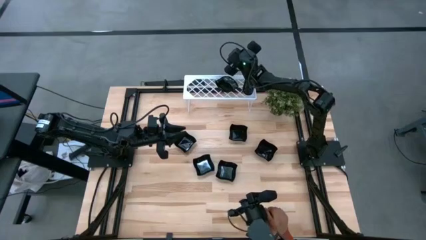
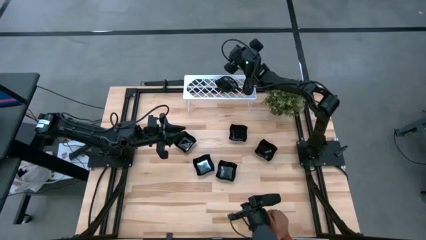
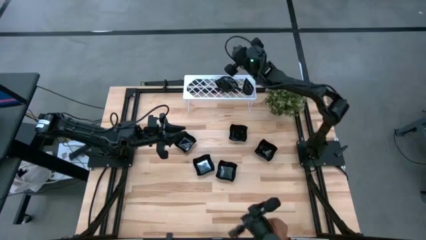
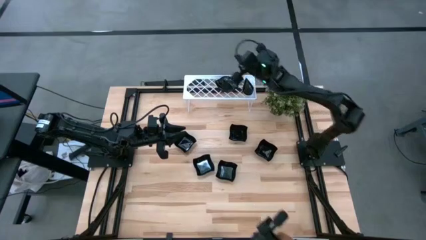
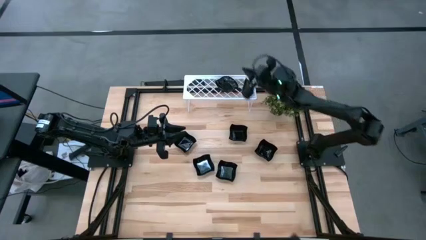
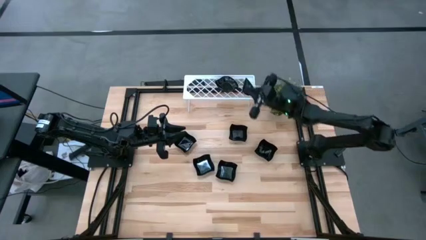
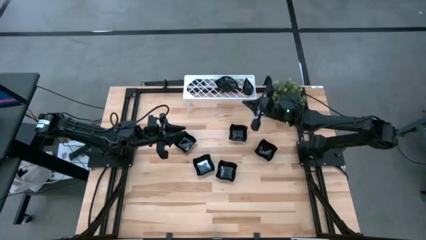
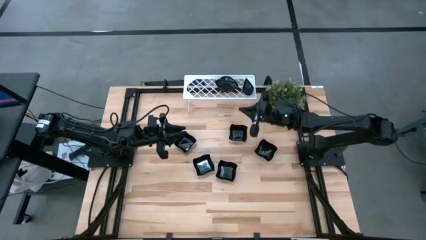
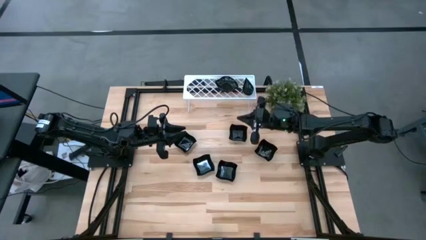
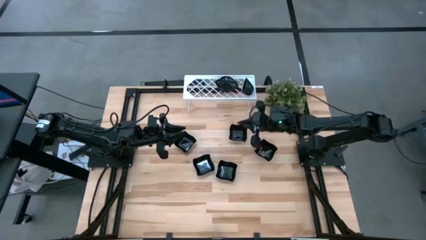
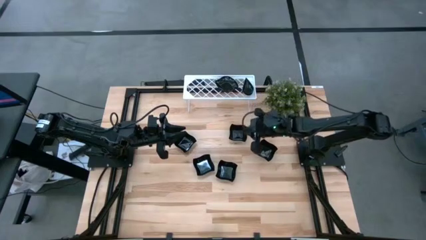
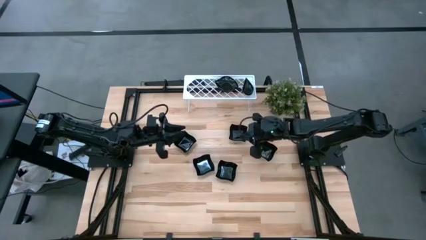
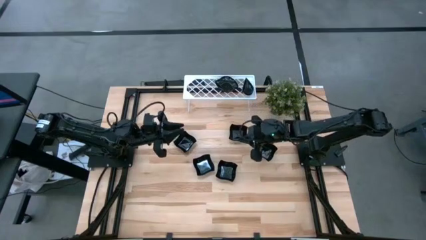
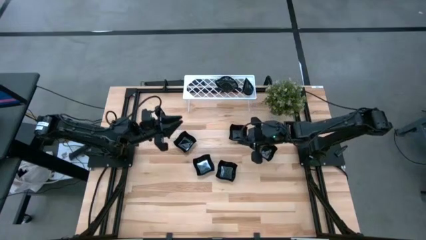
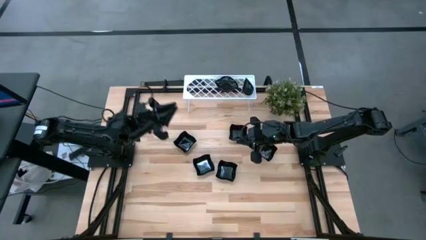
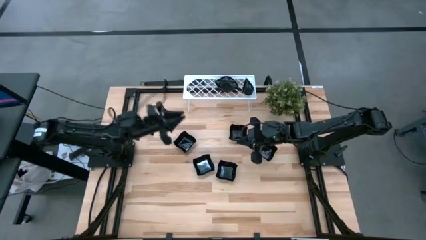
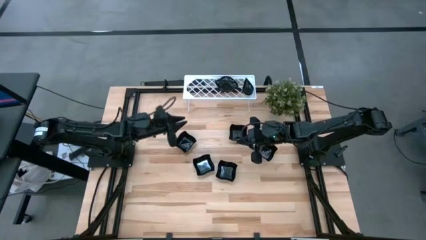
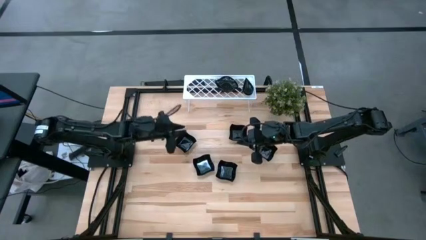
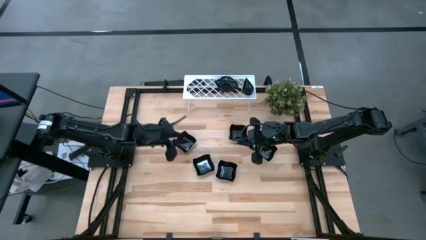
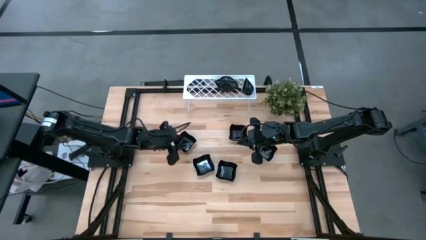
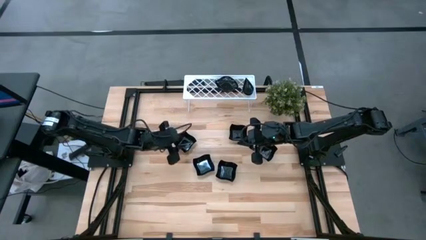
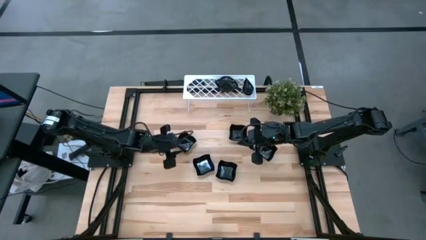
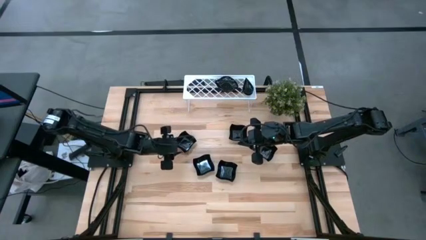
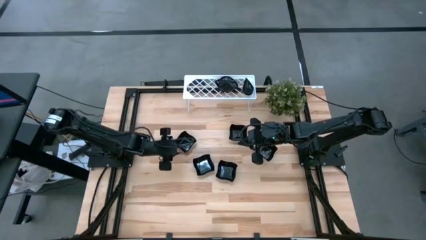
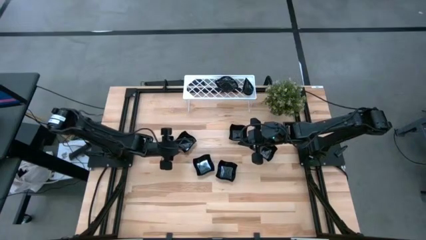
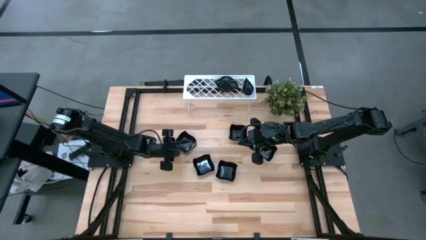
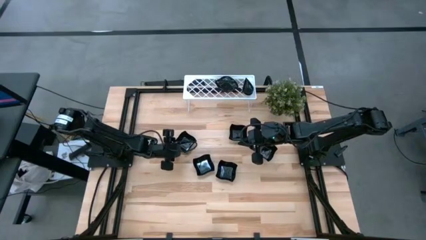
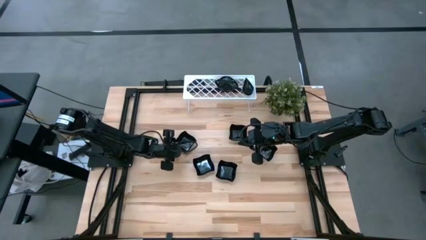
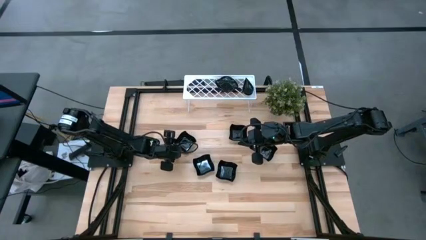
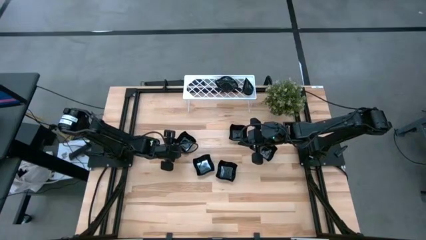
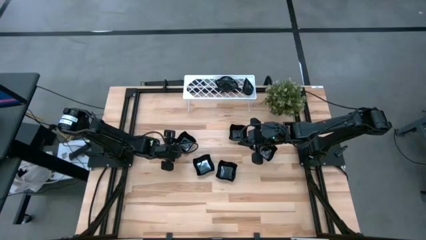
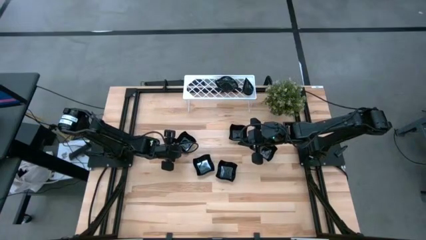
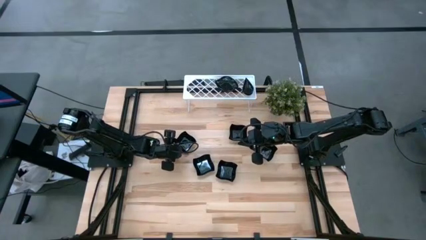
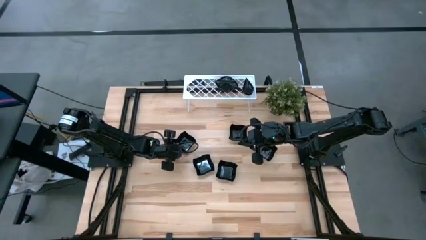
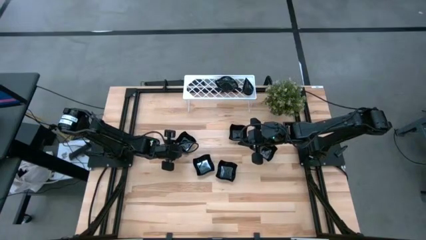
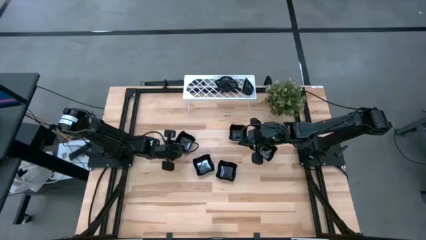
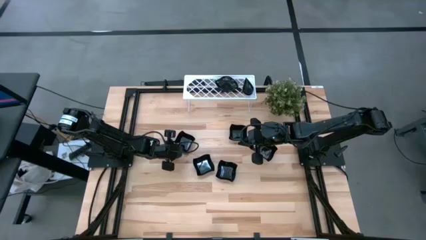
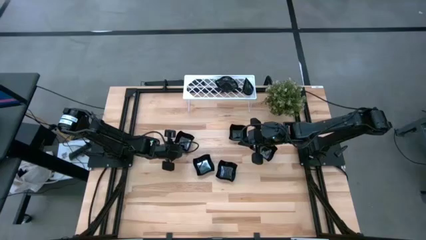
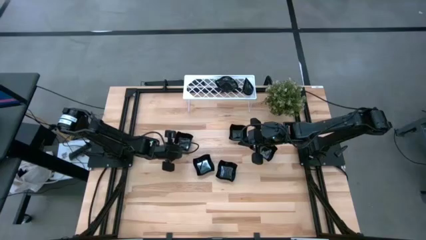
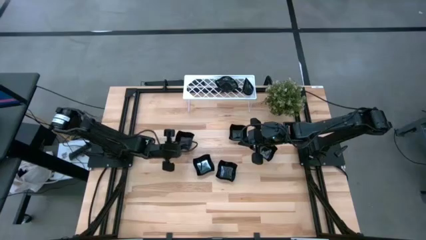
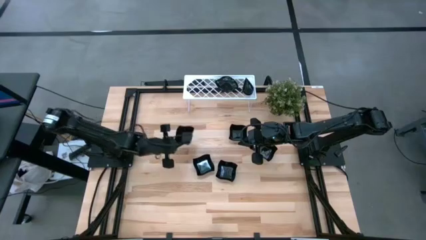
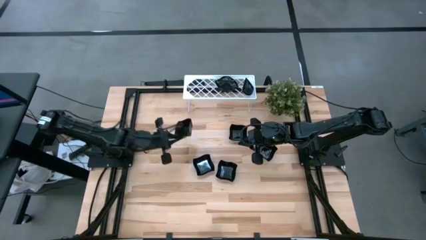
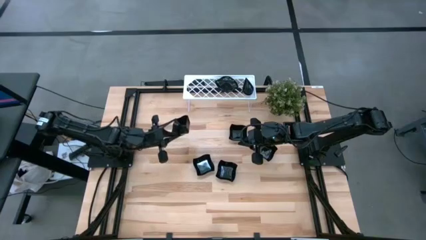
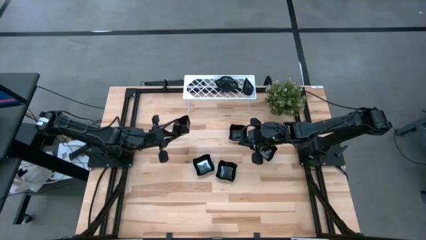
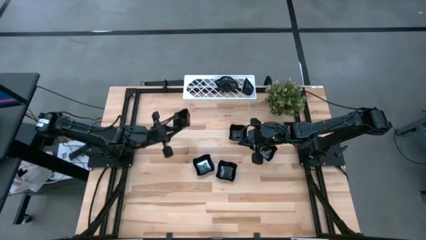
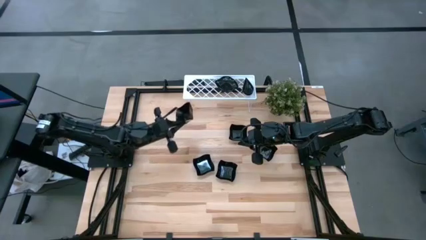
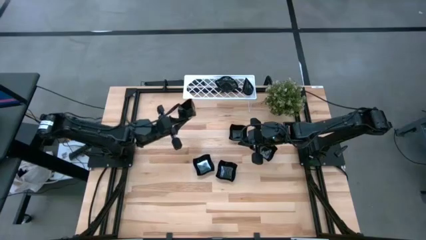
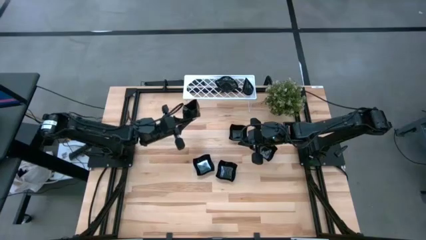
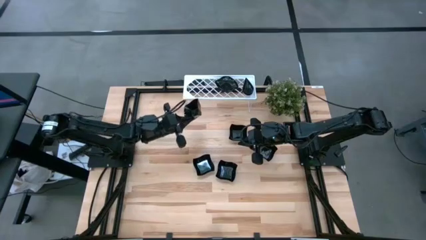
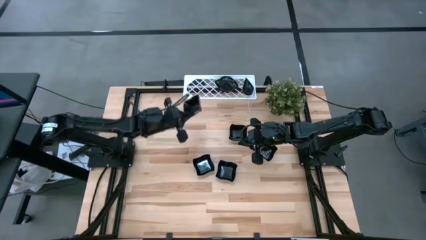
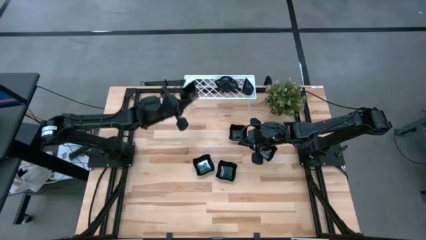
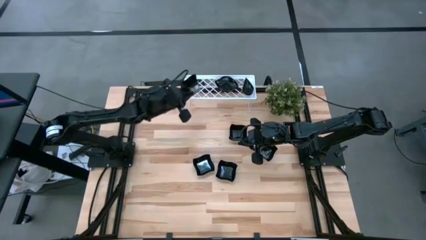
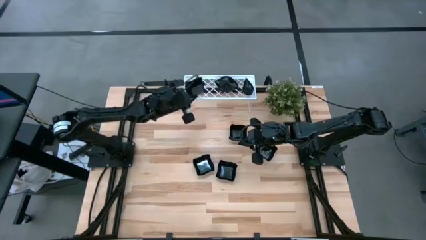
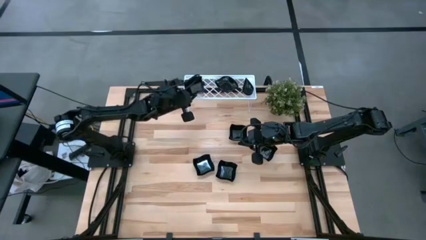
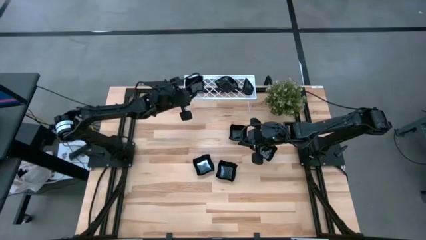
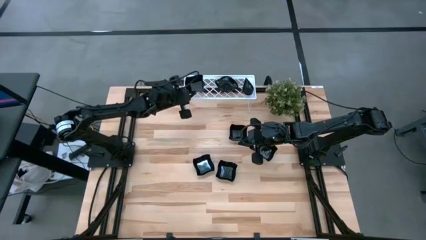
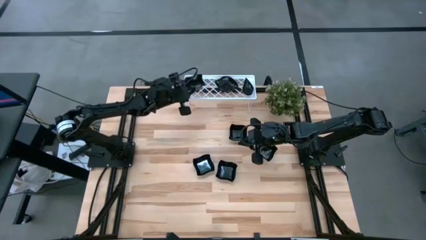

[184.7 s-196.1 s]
Task: Pick & Place Mini shaped plates
Put the distorted square plate on the shelf

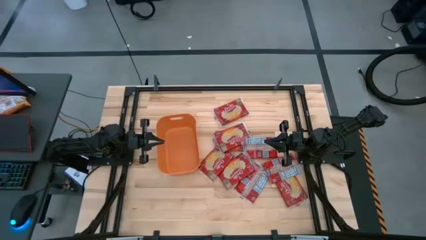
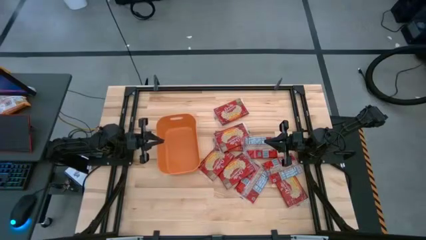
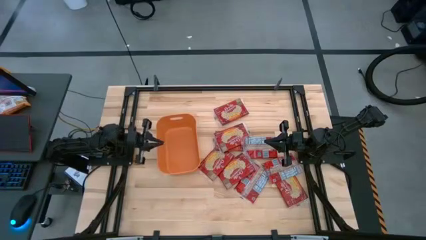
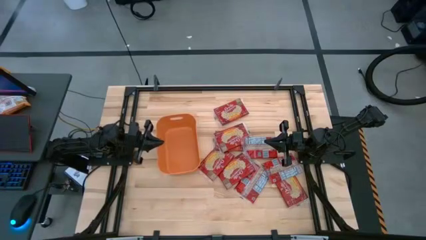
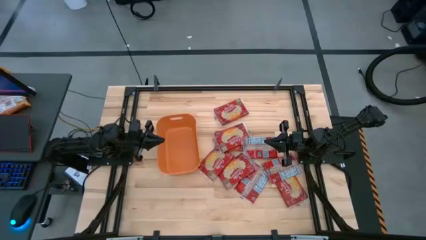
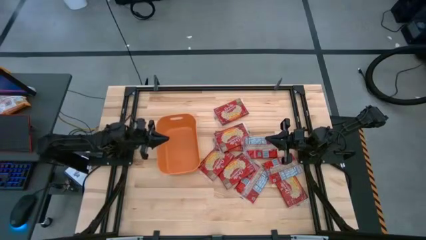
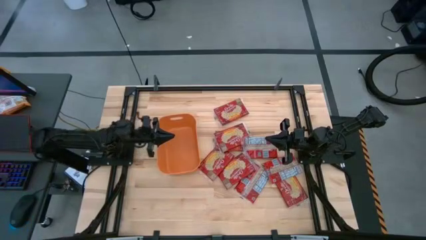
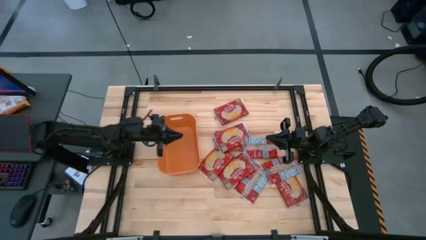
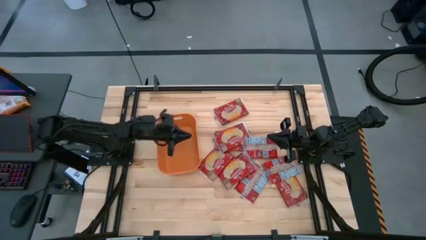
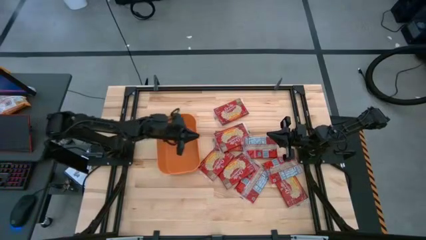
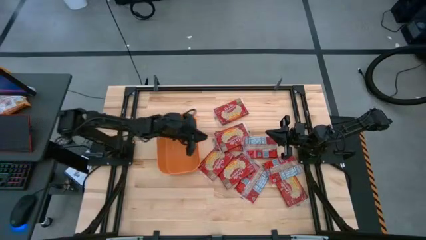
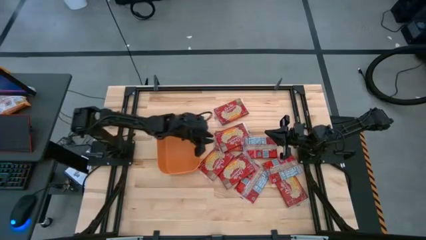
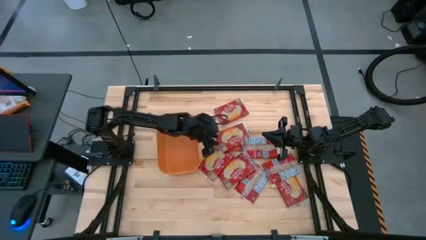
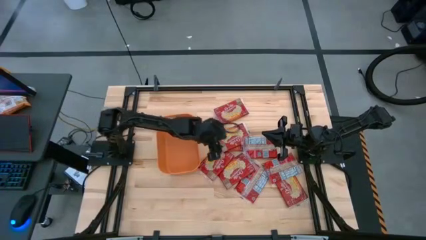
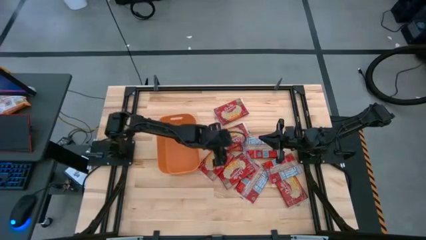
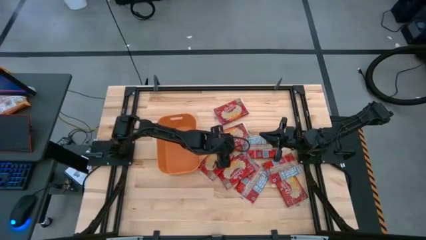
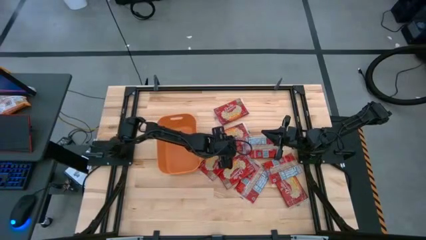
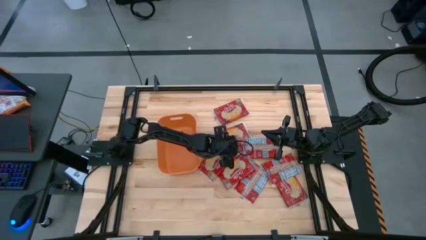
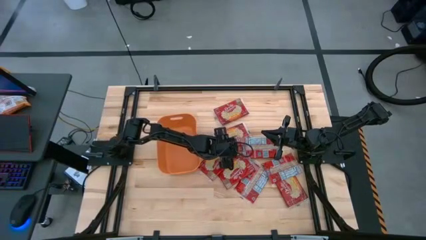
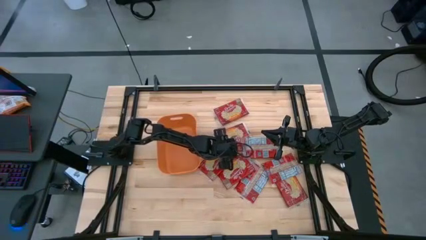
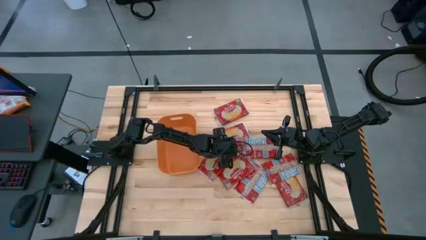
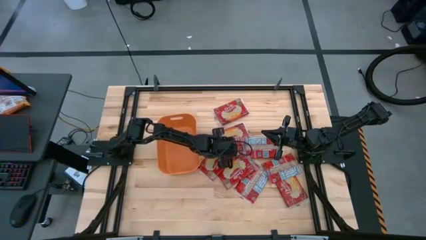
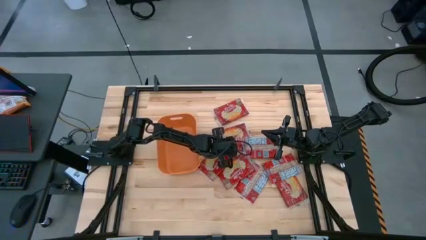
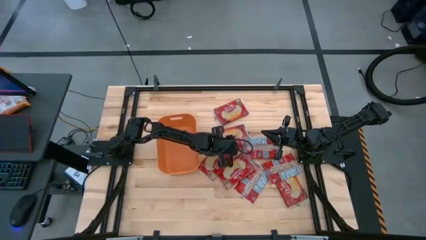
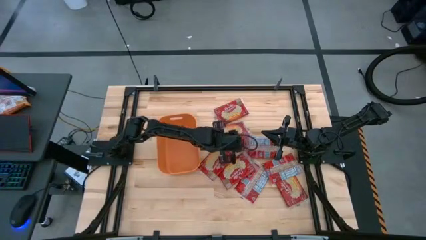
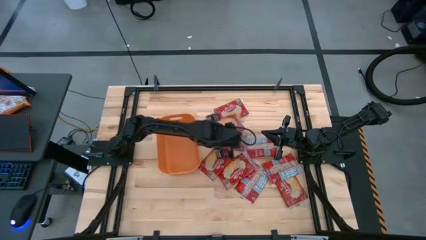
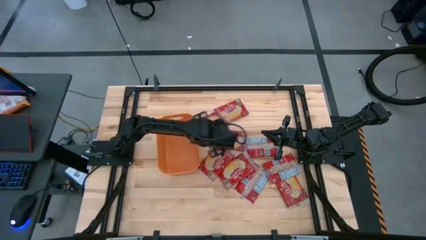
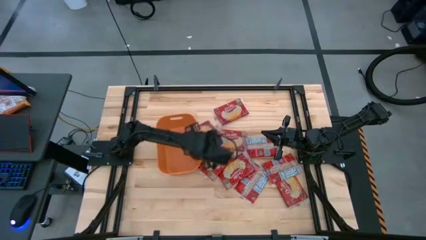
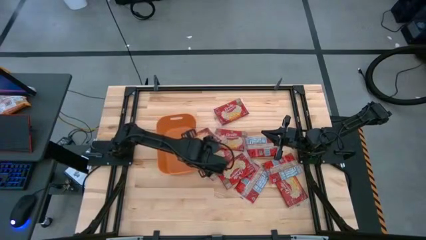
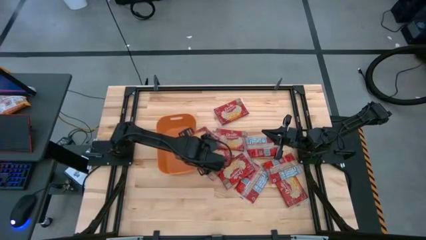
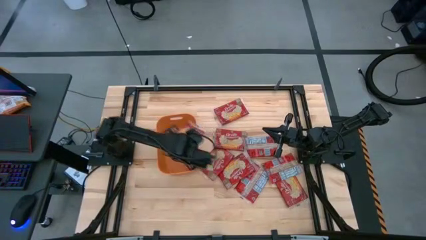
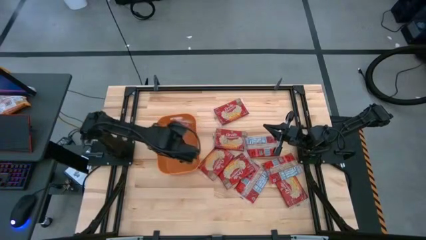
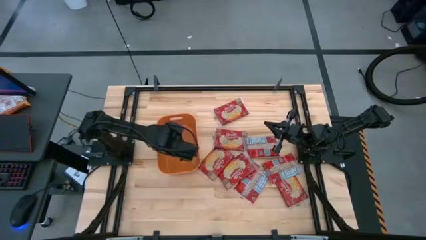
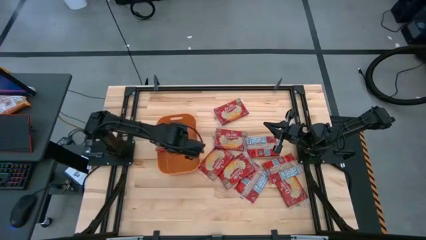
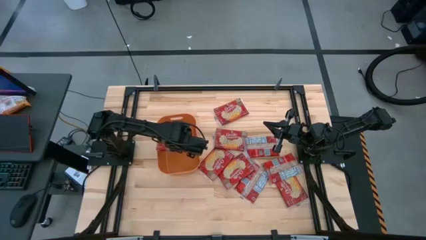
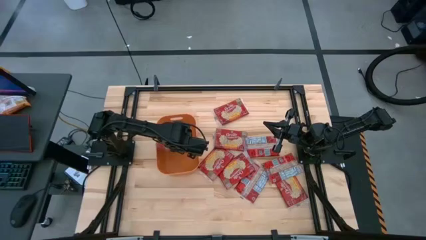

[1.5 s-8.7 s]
Task: Sort popcorn bags into baskets
Put the popcorn bag into the orange bin
